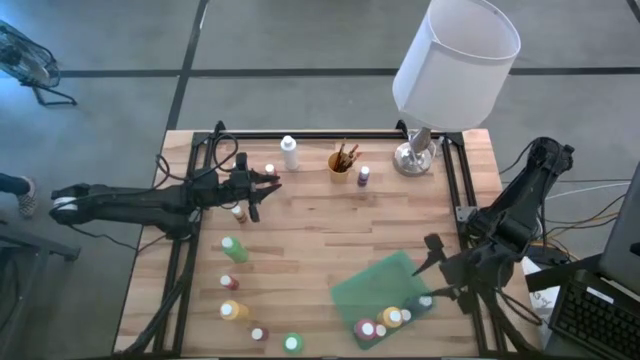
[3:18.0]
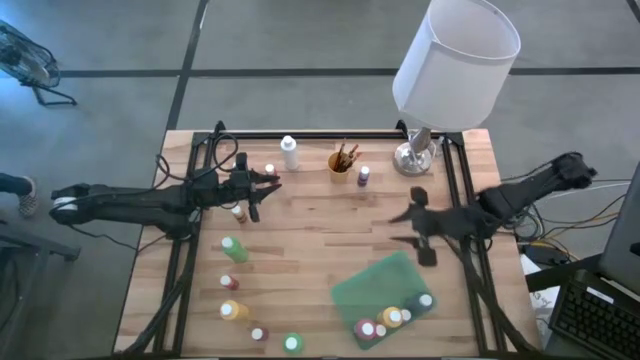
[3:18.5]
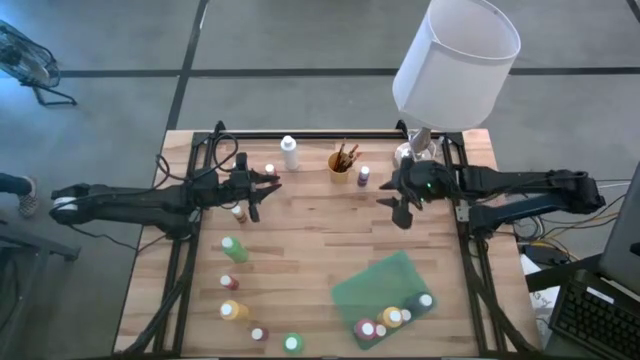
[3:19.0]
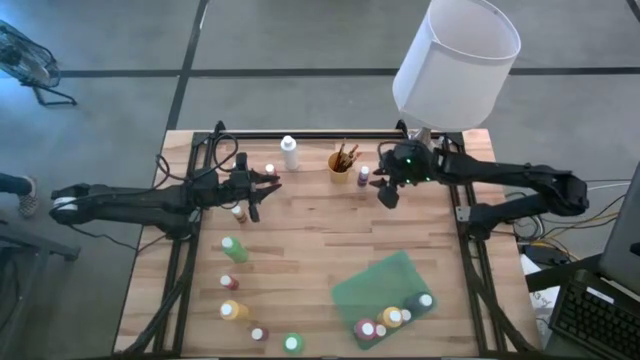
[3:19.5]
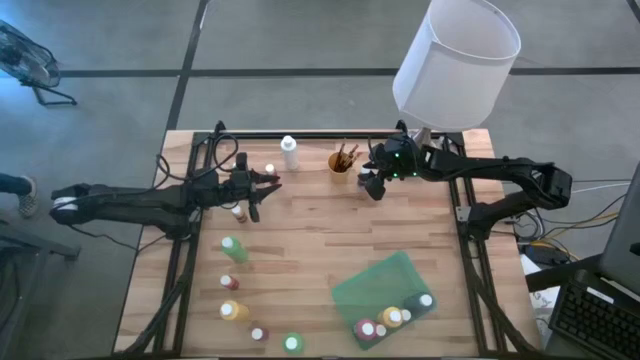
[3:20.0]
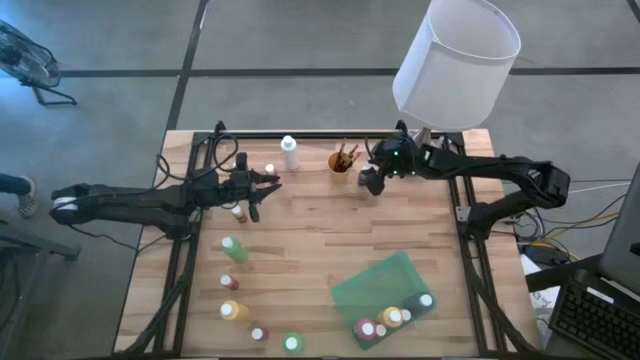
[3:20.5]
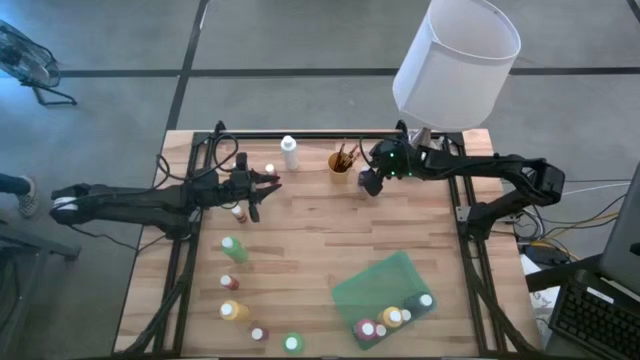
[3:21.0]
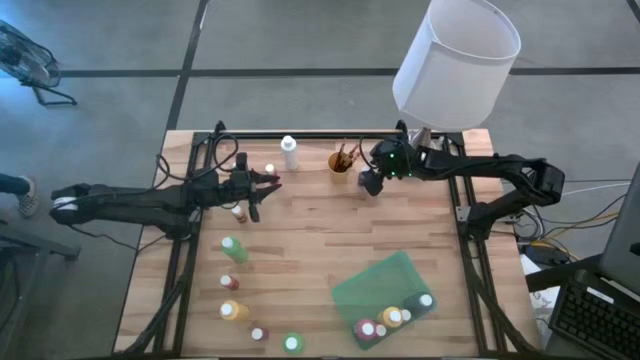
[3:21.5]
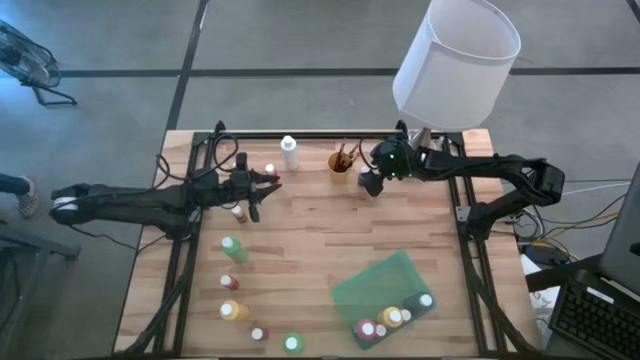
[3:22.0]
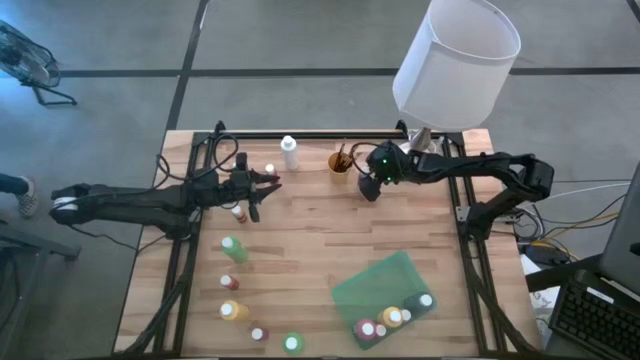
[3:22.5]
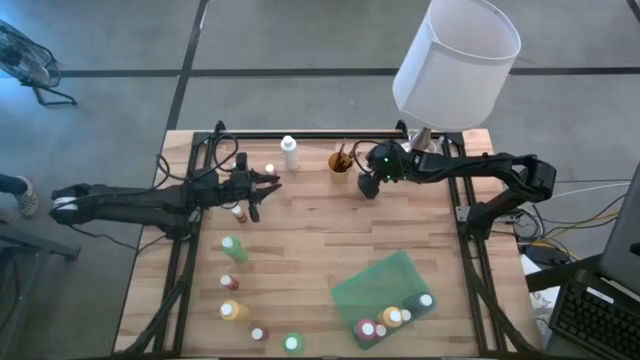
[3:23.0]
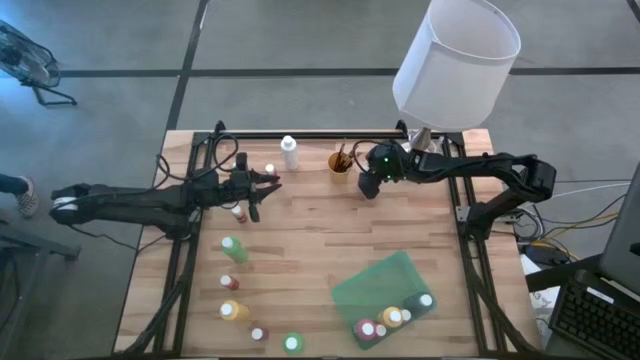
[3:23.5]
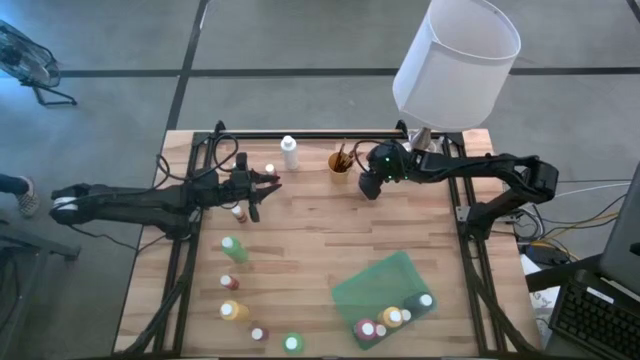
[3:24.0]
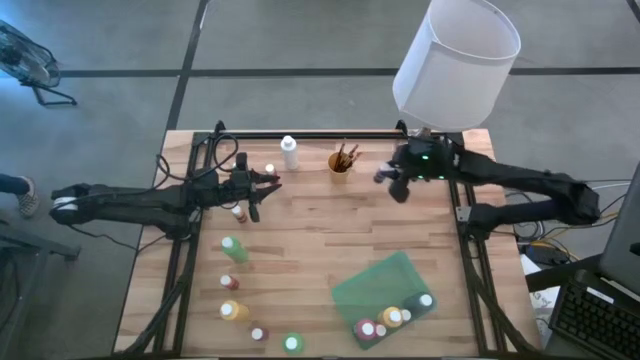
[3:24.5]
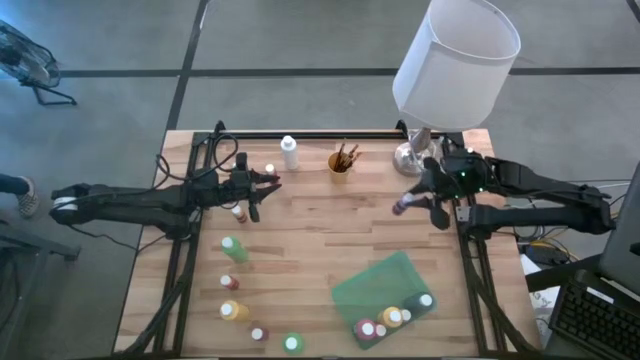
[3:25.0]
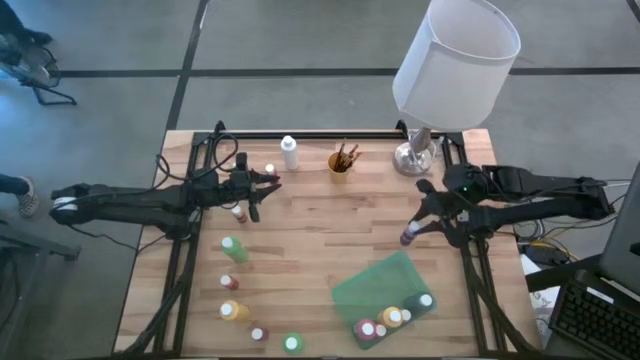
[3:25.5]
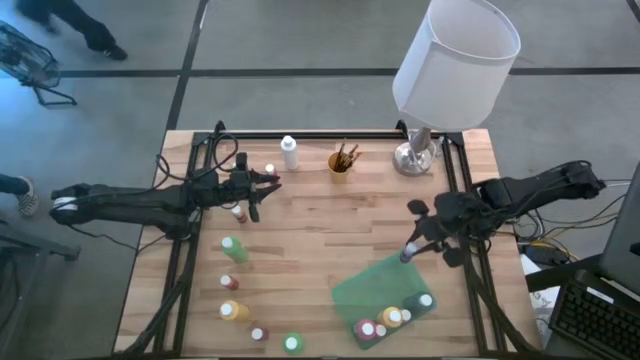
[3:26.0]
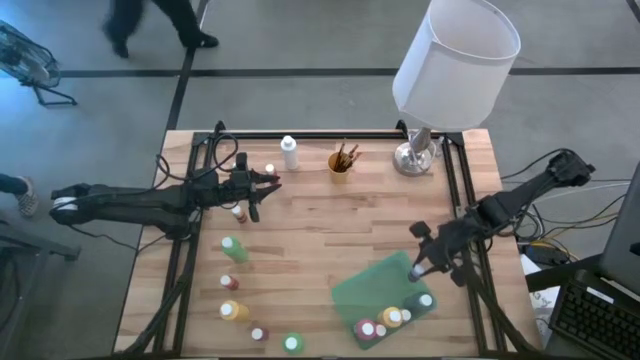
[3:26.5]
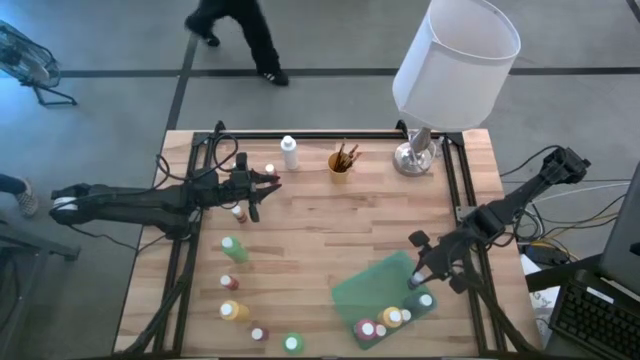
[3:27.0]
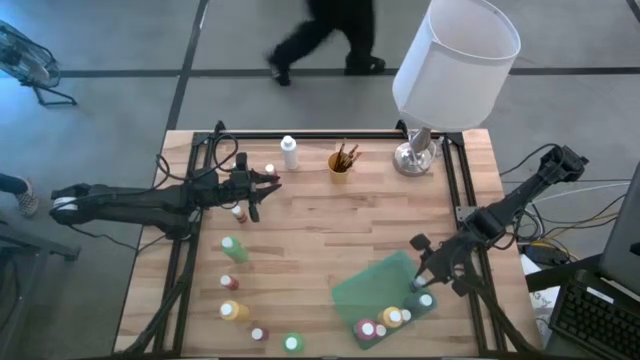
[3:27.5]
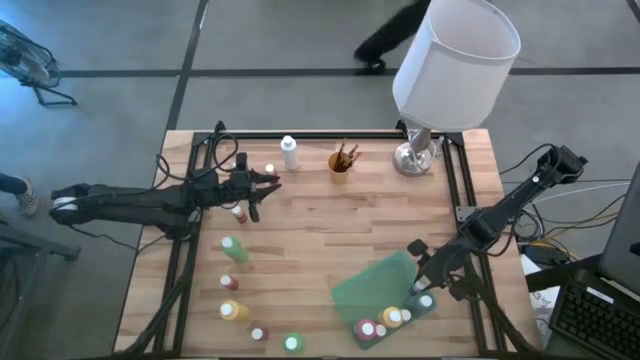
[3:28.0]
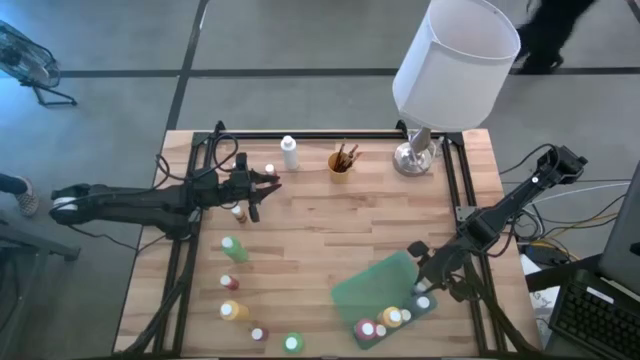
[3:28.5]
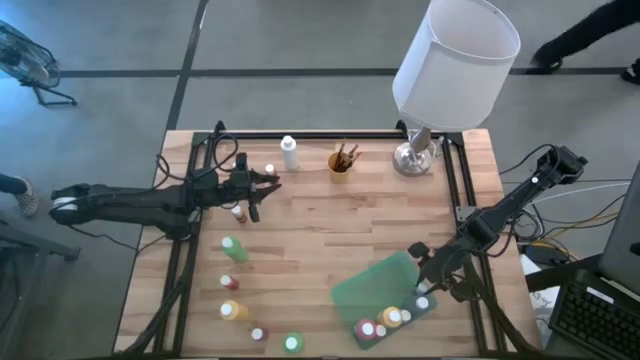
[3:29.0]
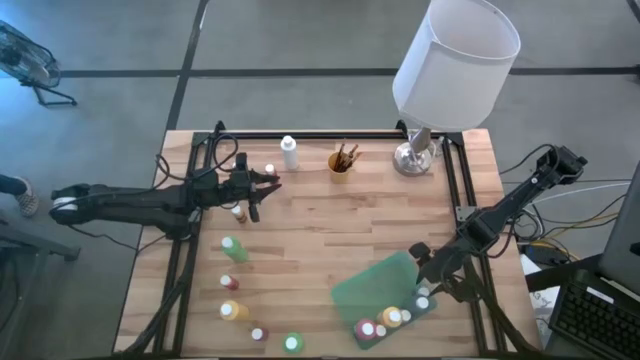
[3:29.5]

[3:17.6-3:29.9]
Task: Pick & Place Paint Supplies
Put the purple paint bottle into the green bin

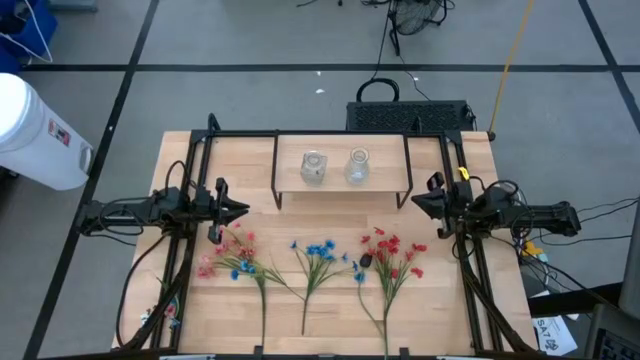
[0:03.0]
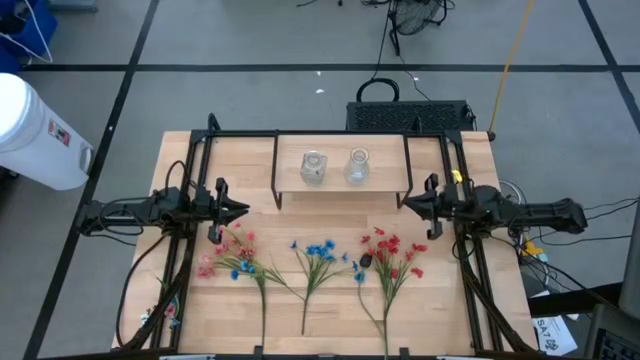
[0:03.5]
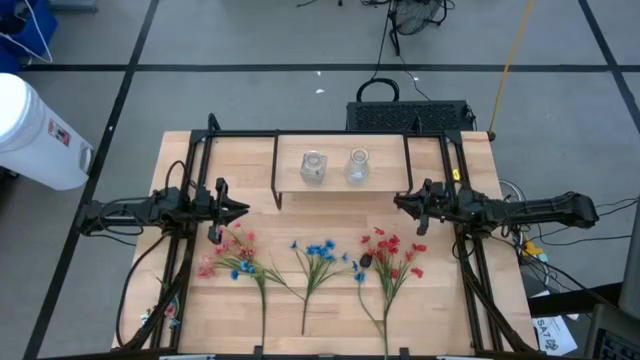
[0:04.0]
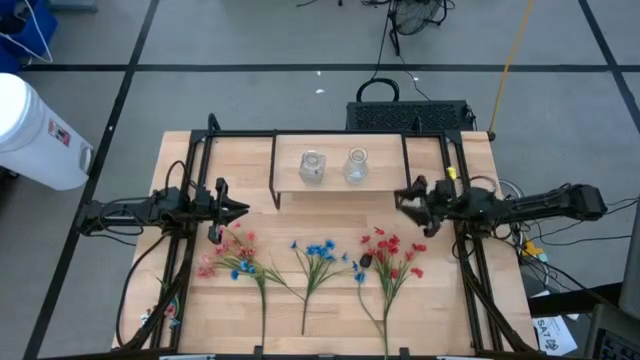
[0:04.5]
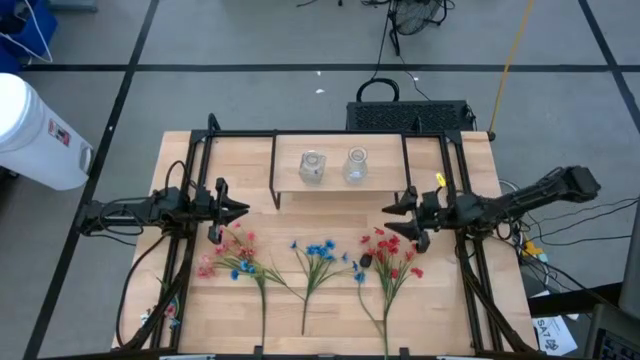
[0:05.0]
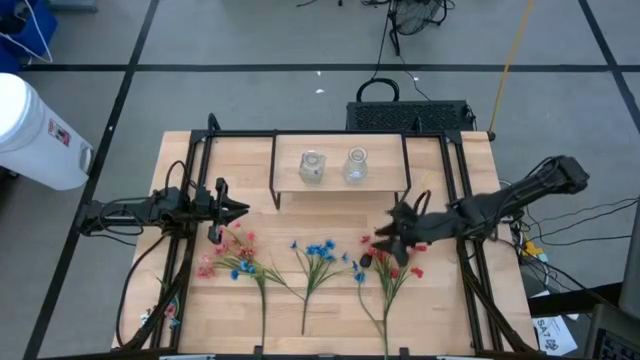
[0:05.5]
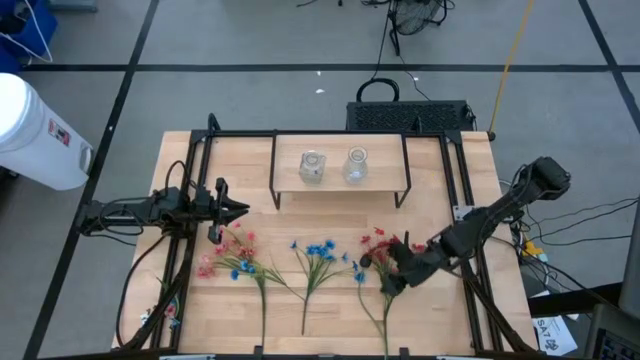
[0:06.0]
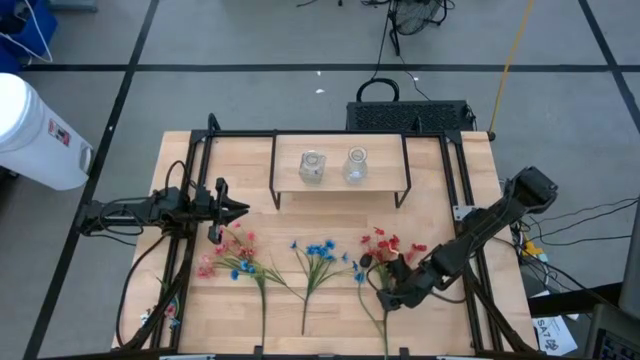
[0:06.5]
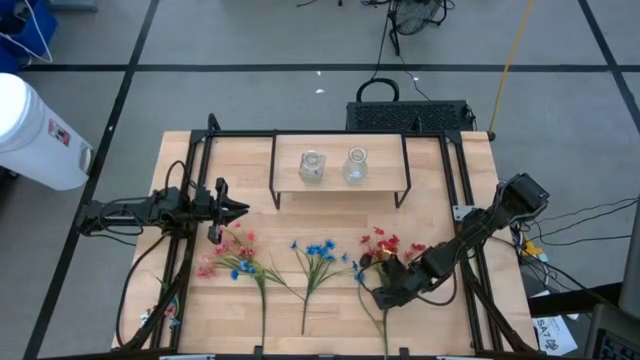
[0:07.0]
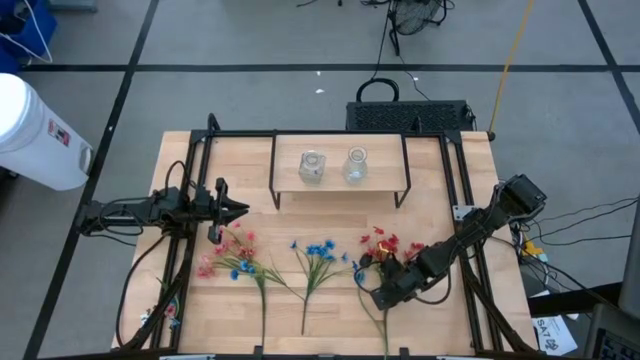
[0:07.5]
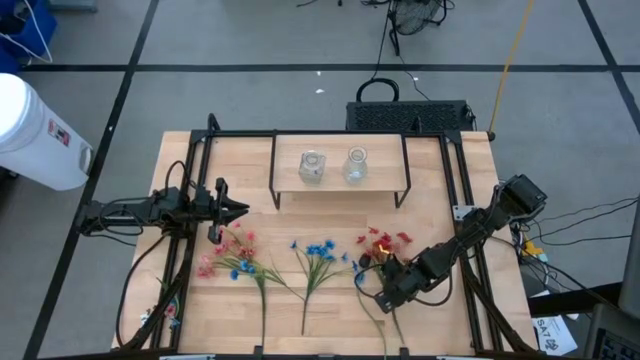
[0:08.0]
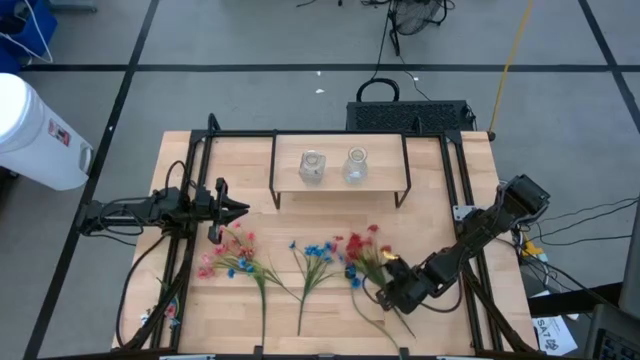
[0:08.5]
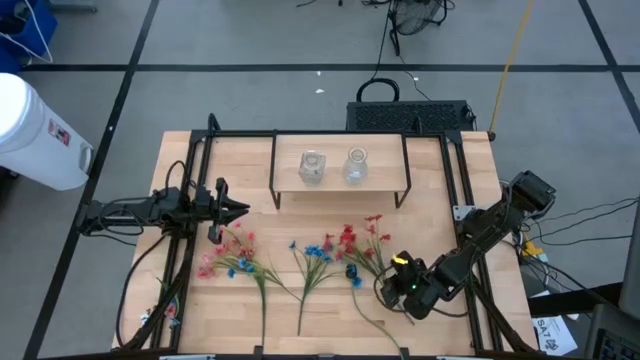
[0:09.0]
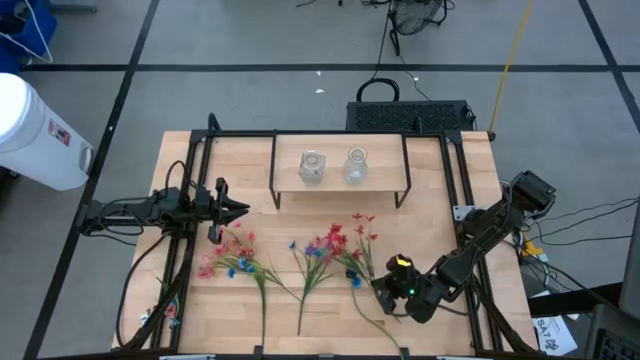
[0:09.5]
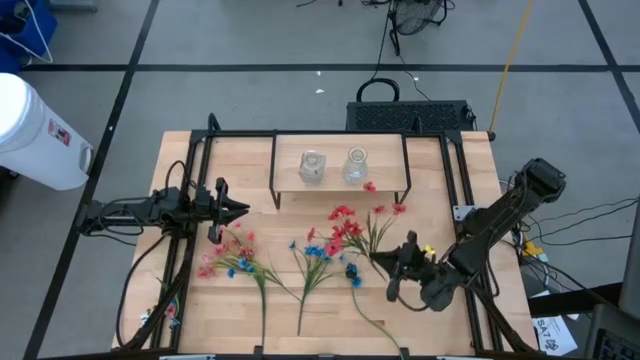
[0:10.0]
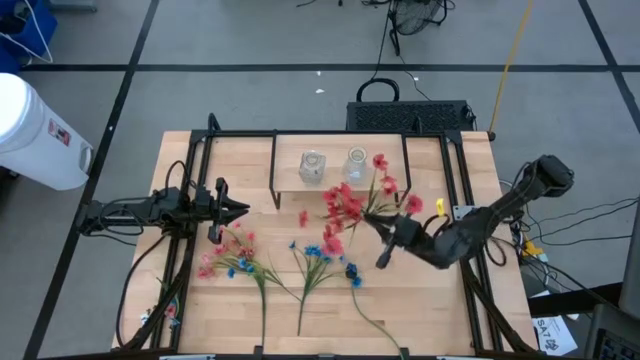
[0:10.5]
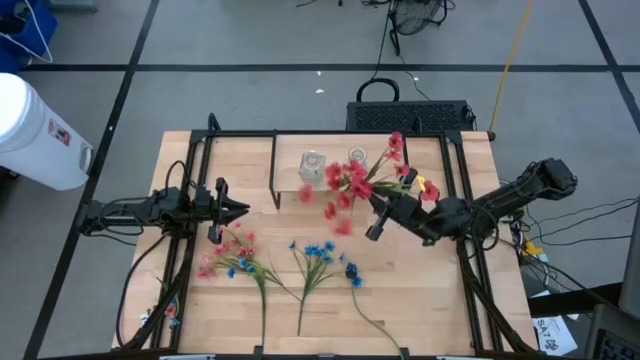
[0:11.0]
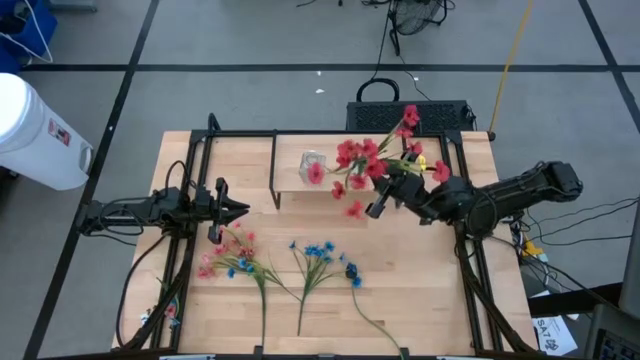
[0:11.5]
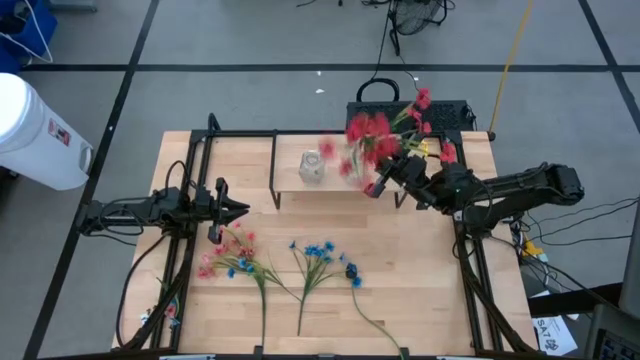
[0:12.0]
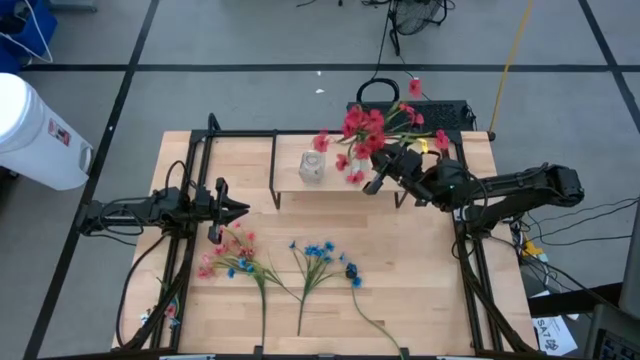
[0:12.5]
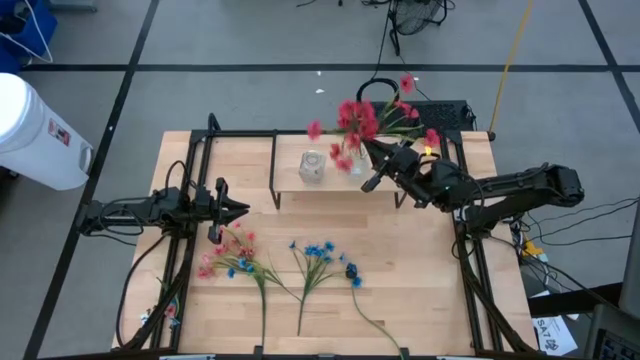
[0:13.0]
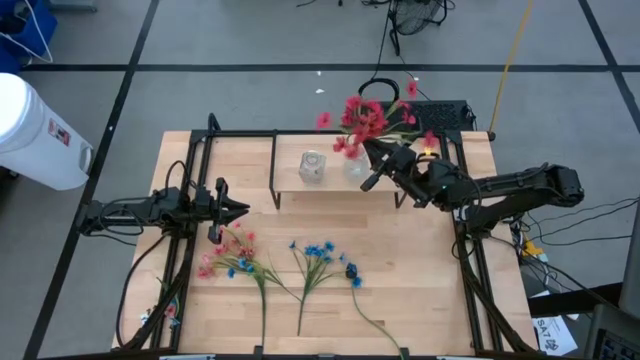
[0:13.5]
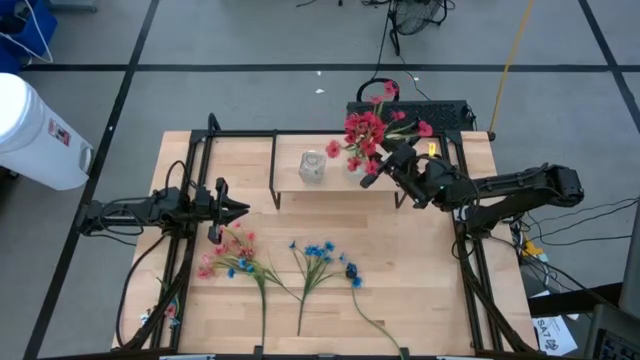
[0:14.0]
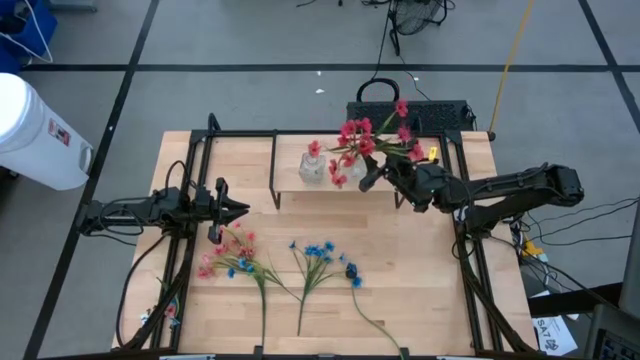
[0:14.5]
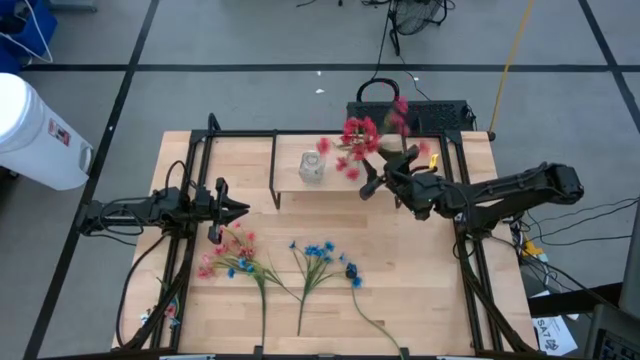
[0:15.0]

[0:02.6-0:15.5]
Task: Pick and place flowers into a vace then onto a shelf
Put the red flowers into the right transparent vase on the shelf
